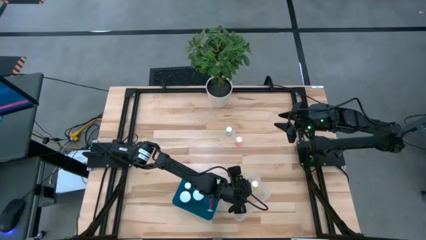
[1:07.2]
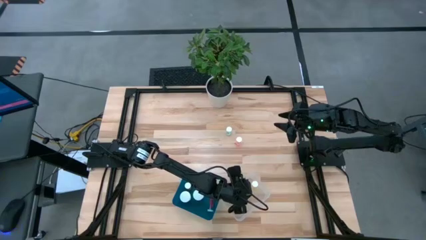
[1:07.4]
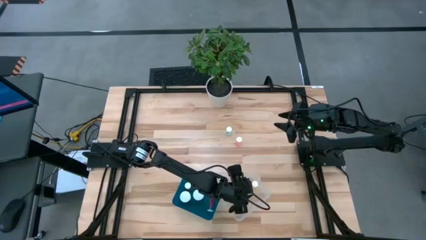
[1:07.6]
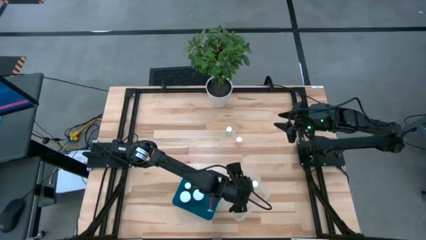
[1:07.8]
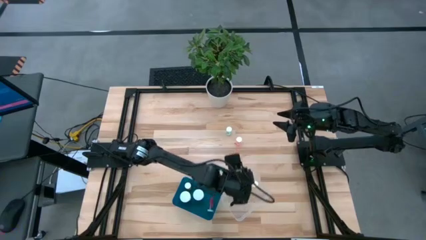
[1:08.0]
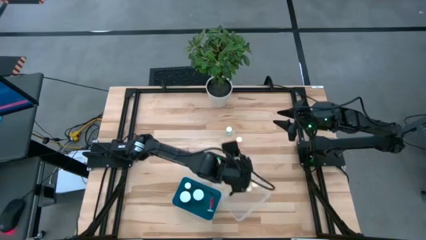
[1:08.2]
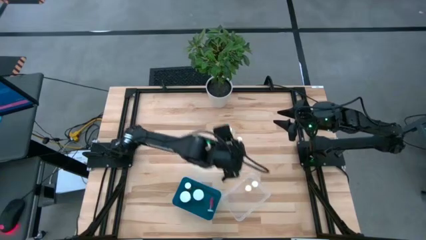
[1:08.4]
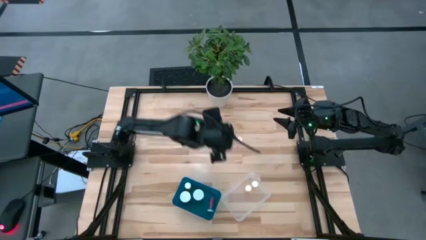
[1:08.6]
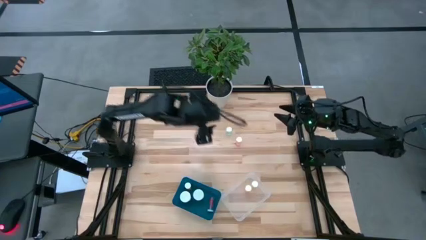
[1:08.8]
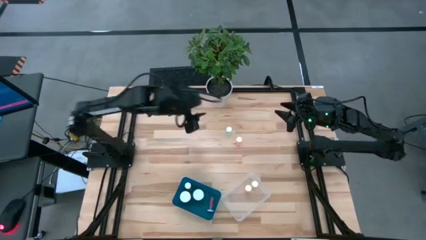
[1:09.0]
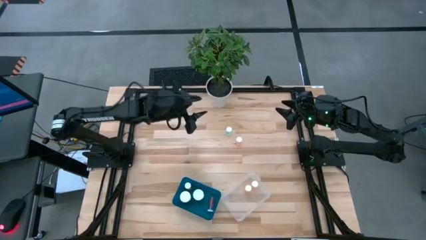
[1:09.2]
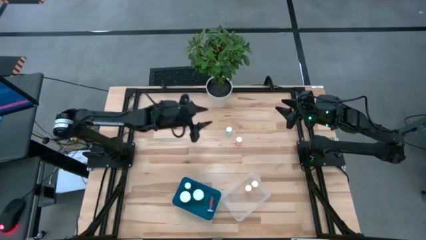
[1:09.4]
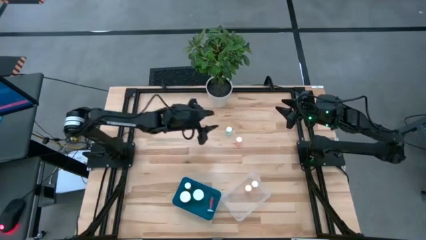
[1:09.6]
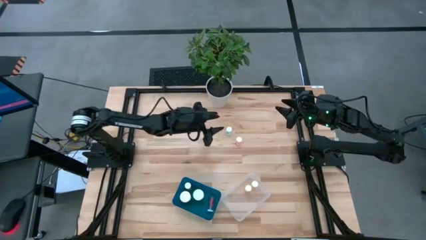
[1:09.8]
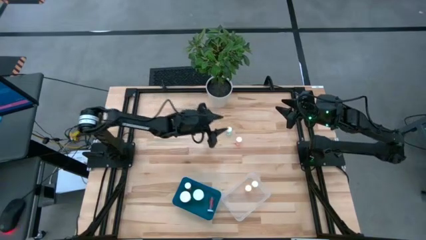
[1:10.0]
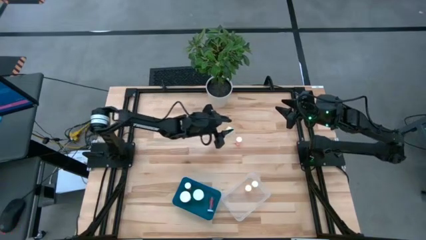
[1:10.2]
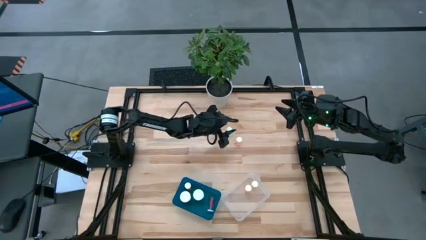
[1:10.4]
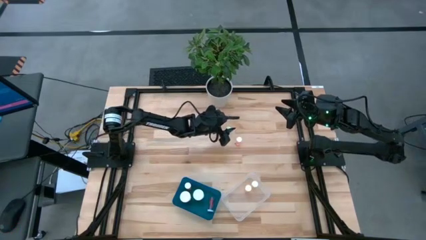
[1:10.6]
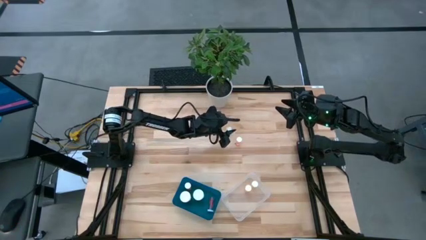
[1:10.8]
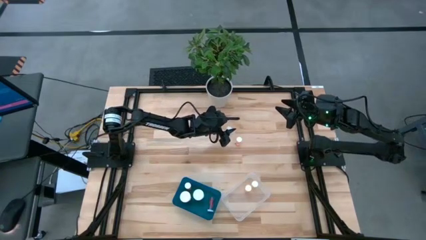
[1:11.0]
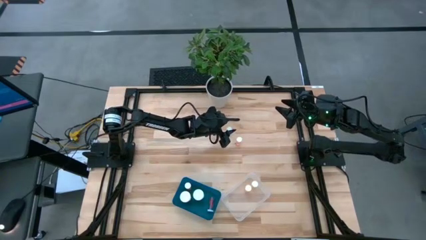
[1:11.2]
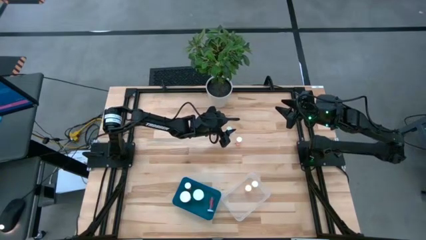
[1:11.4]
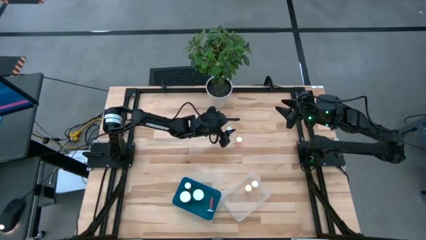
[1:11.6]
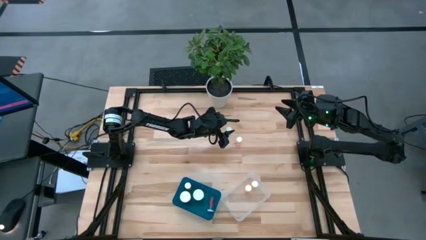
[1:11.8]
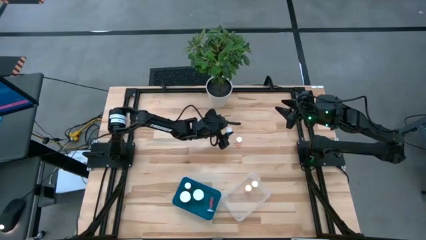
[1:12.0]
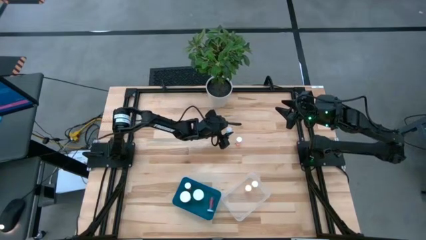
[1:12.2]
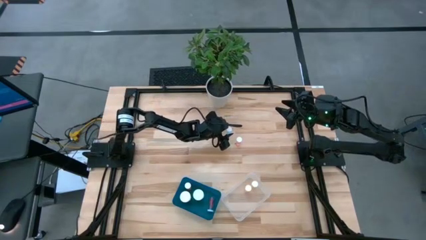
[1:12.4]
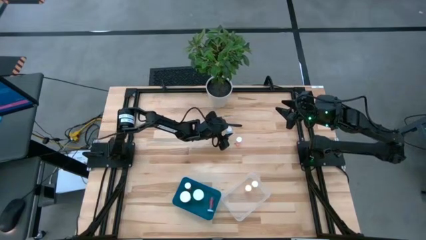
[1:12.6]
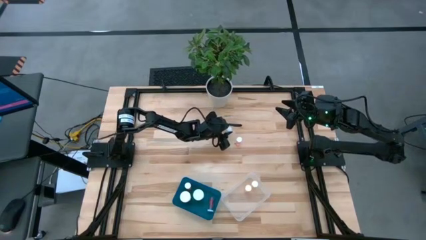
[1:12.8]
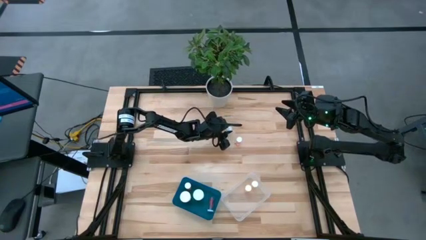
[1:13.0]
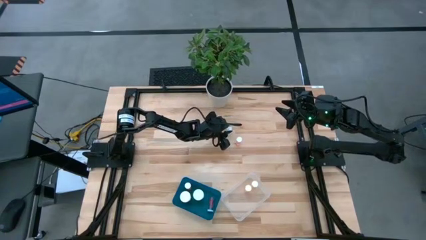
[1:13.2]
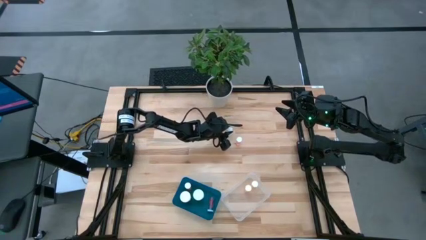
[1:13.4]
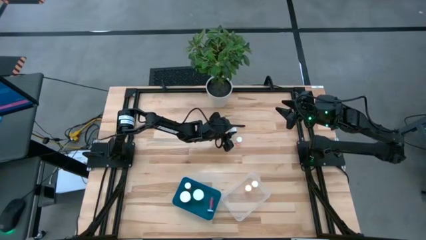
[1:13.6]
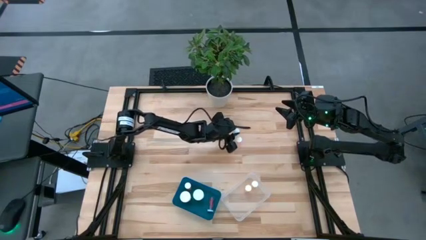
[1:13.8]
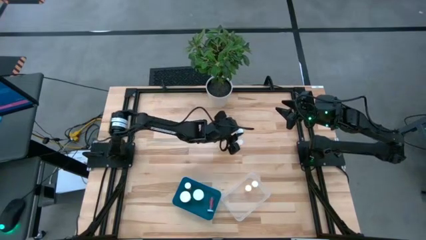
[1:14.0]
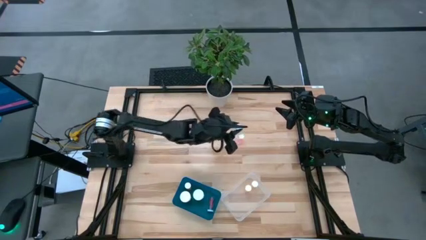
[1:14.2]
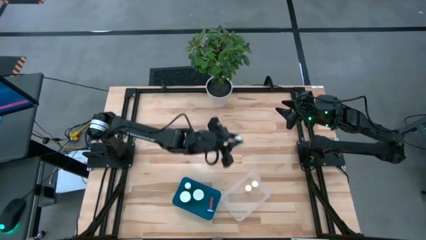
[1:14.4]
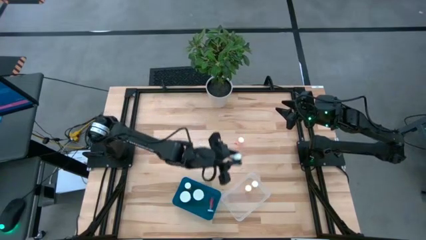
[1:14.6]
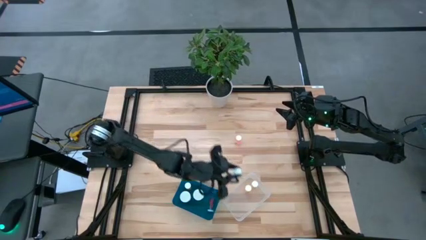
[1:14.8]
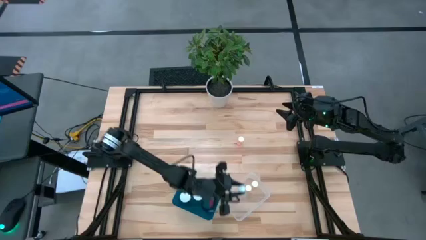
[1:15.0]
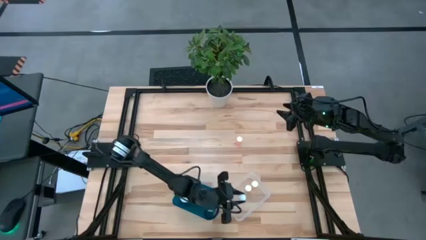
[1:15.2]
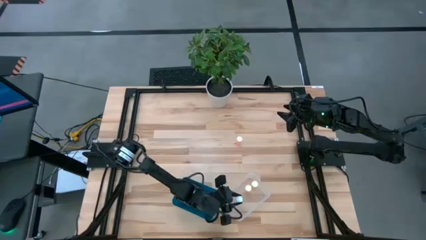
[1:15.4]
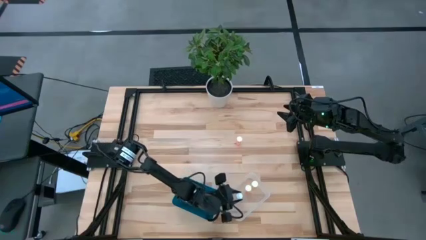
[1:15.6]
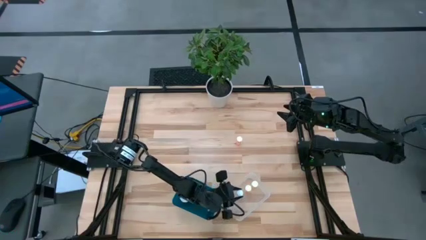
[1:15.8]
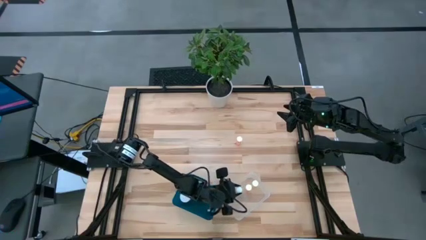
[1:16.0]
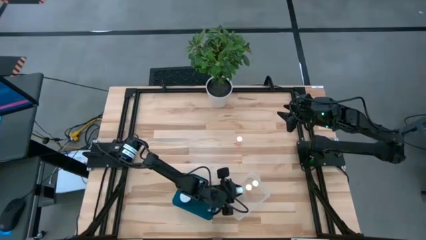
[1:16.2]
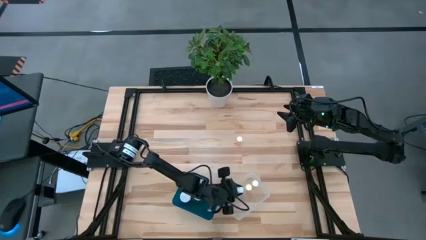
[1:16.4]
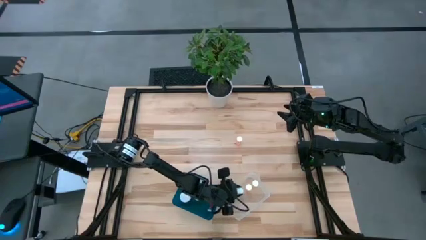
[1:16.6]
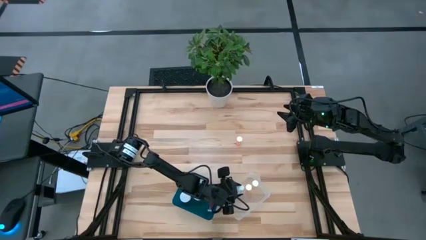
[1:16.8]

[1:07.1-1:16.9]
Task: Pick and place medicine bottles into bin by pill shape (circle, oval)
Put the small blue pill bottle into the transparent bin

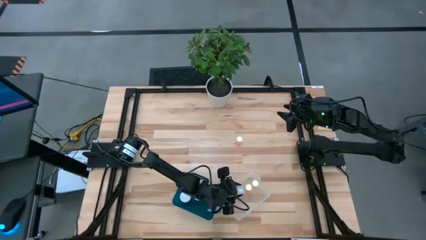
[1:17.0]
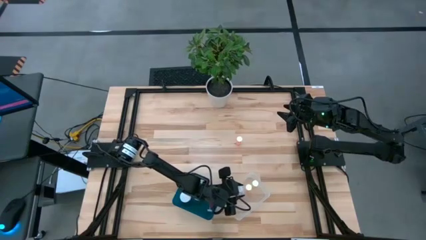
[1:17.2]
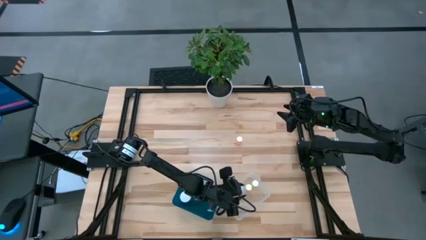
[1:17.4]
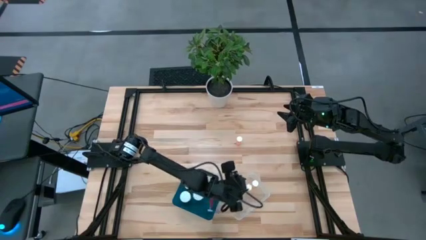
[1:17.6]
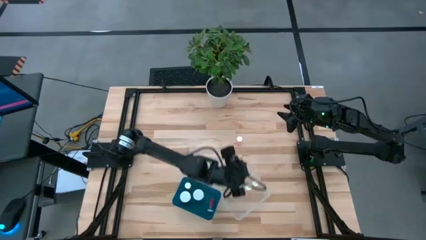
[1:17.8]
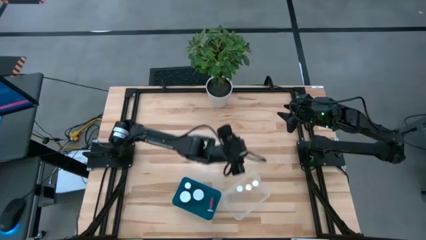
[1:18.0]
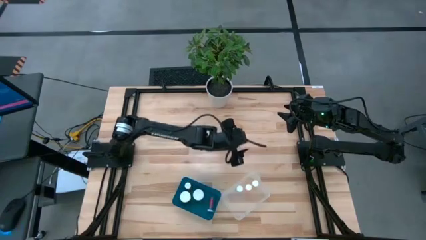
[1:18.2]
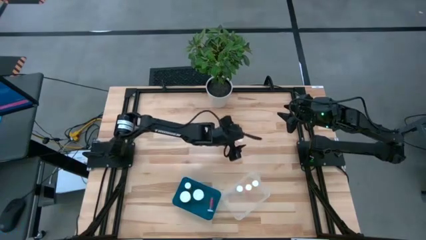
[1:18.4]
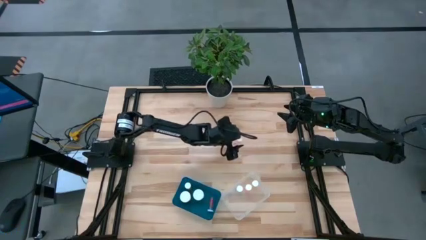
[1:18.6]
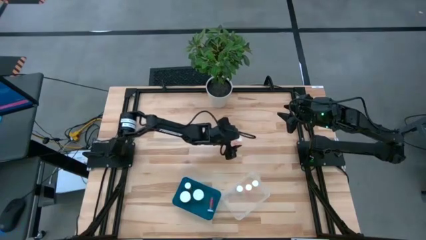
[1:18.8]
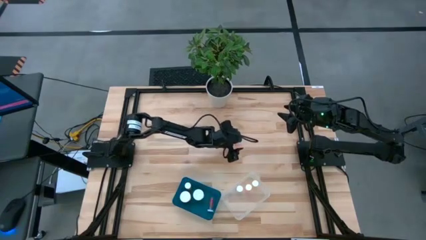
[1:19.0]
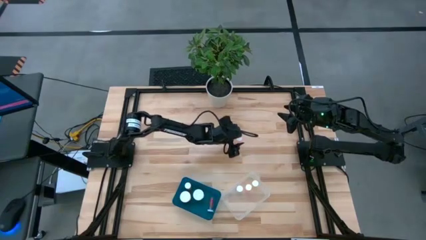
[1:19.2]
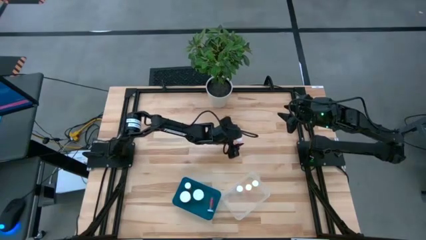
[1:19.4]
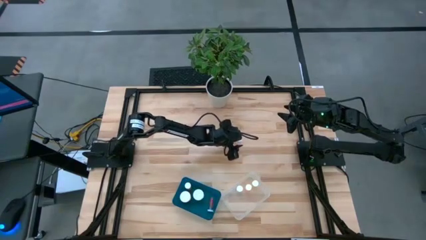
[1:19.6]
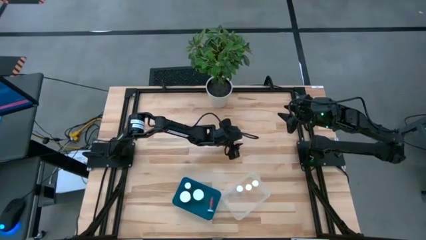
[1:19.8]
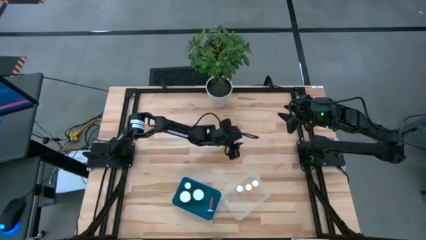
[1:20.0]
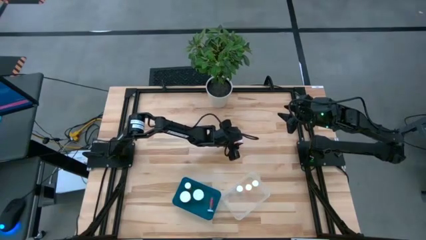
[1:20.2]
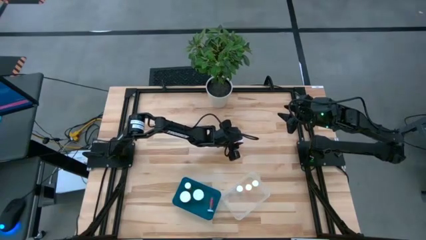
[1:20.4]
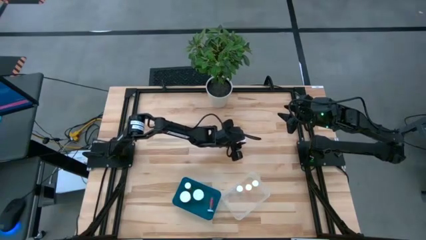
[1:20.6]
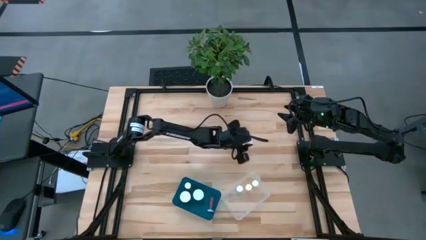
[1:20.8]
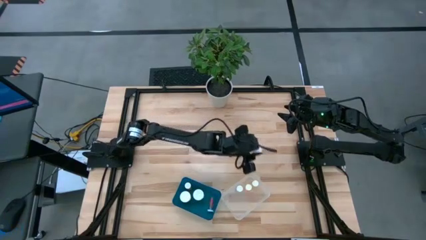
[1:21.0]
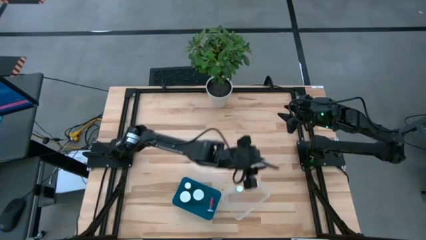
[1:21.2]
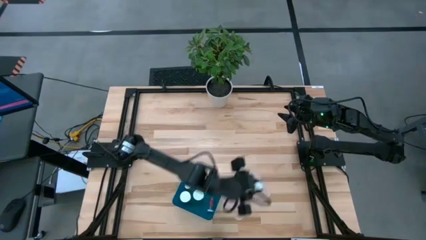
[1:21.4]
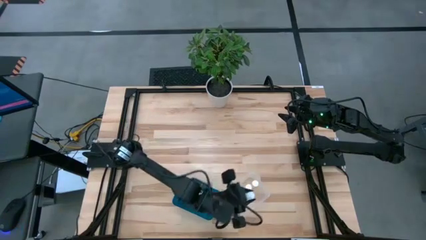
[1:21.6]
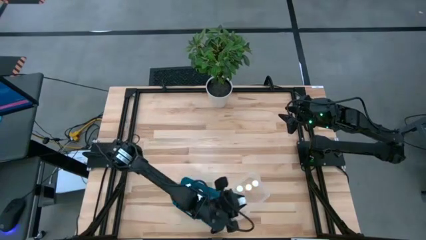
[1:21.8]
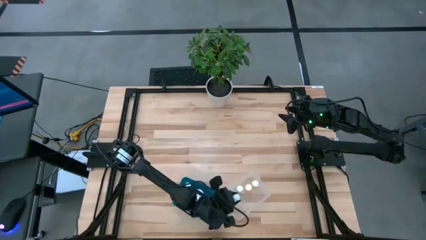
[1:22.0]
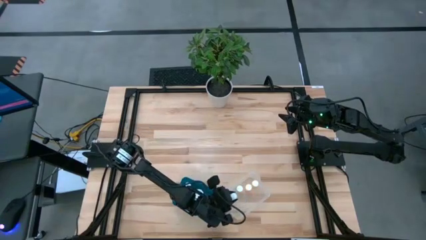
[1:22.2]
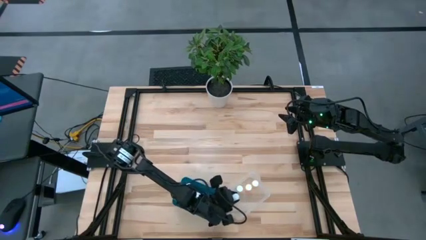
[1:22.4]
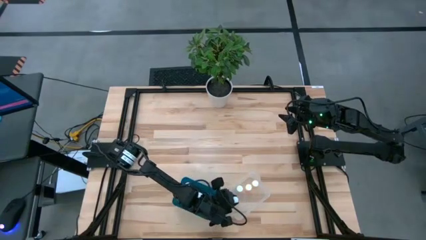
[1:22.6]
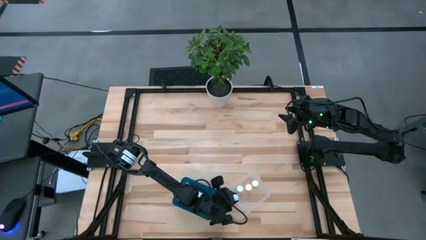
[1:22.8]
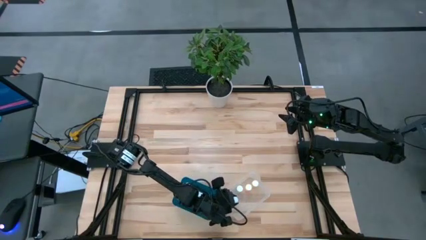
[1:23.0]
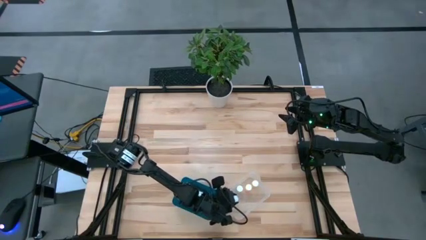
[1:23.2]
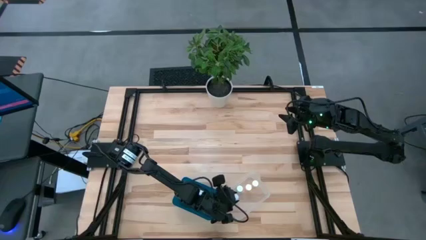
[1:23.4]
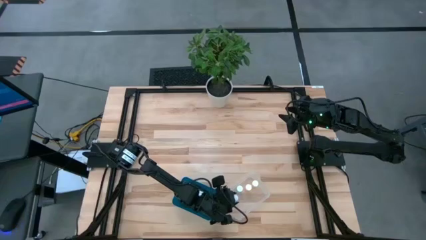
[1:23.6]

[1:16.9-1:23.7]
Put the small pink pill bottle into the transparent bin
